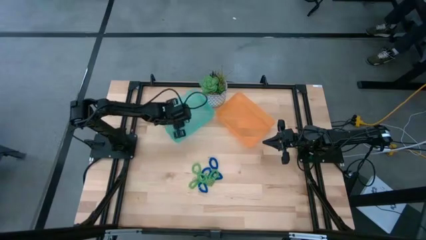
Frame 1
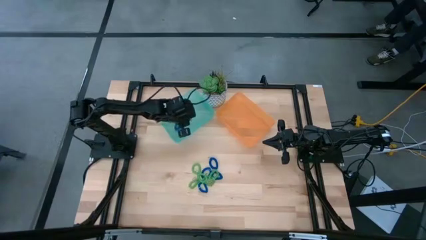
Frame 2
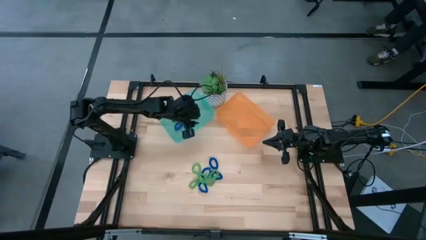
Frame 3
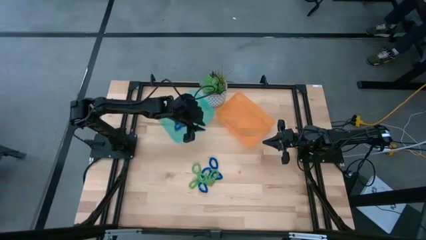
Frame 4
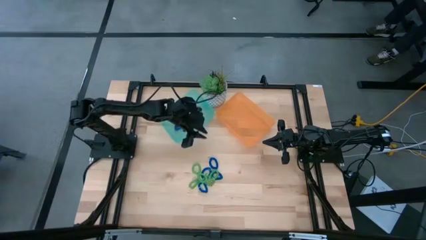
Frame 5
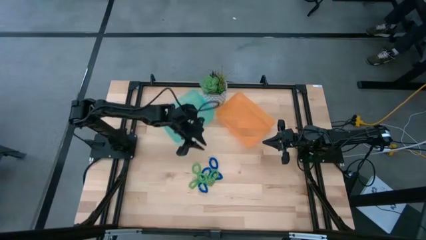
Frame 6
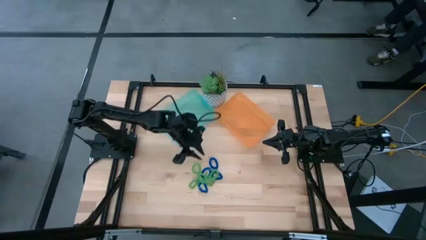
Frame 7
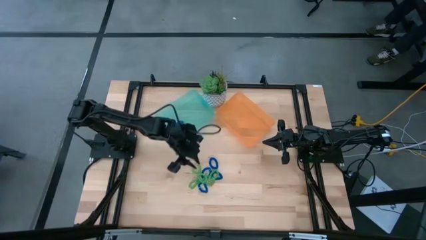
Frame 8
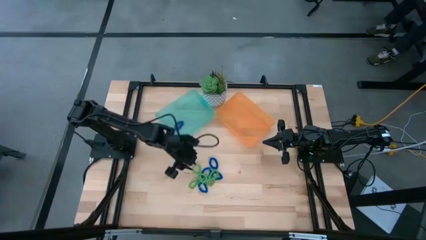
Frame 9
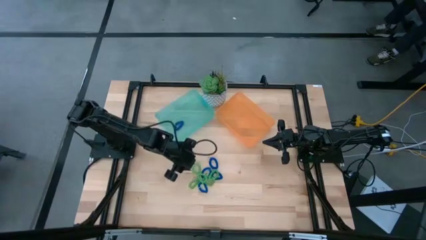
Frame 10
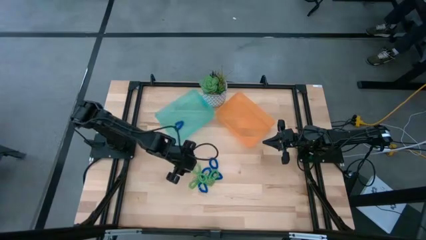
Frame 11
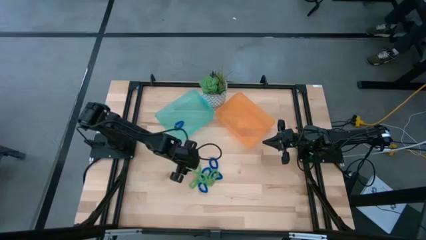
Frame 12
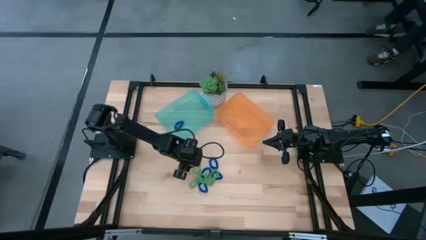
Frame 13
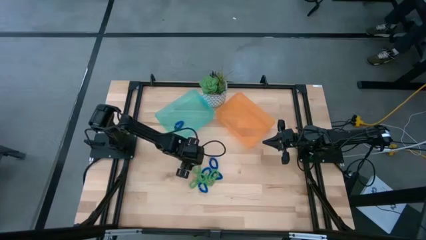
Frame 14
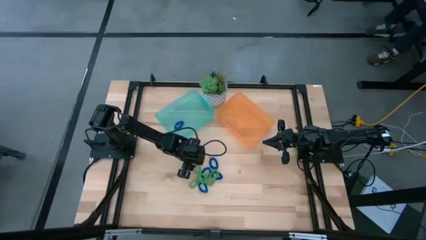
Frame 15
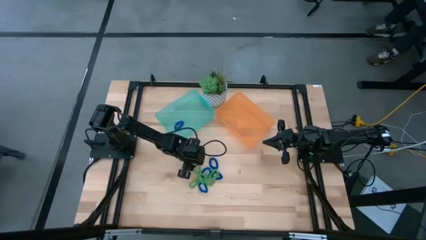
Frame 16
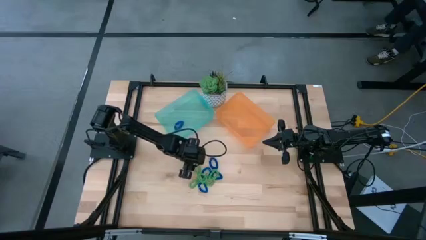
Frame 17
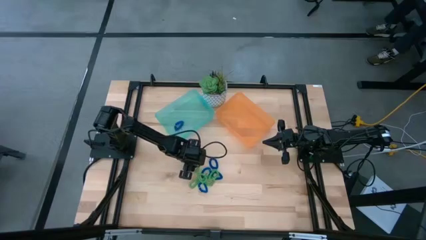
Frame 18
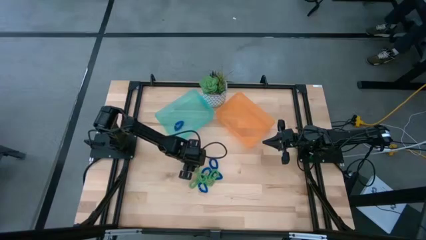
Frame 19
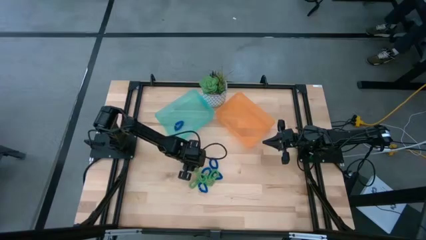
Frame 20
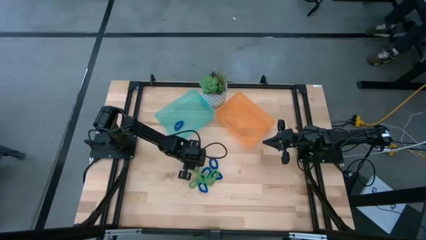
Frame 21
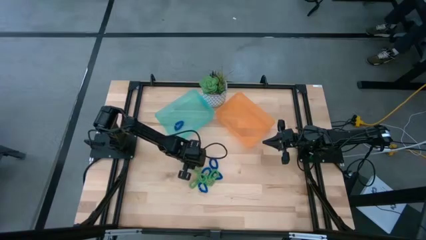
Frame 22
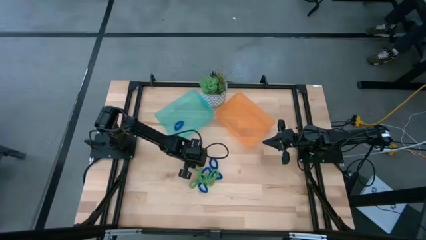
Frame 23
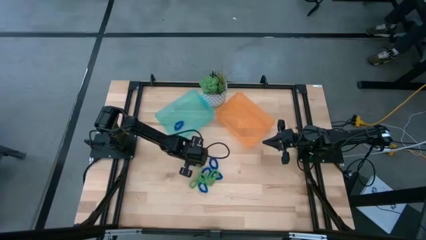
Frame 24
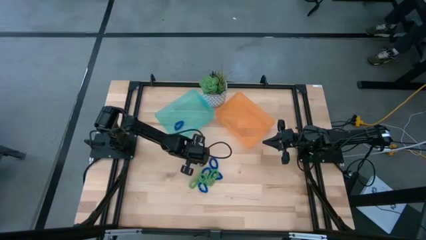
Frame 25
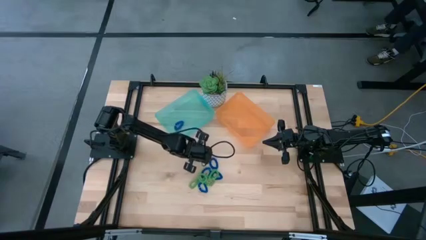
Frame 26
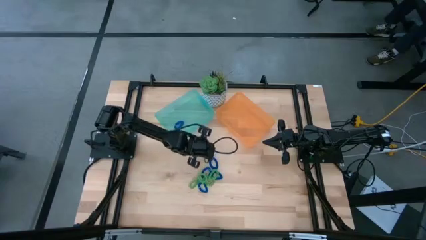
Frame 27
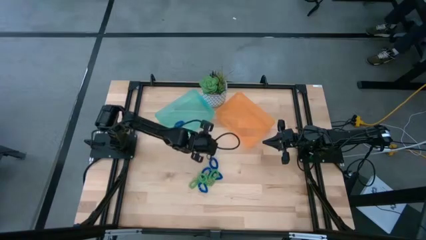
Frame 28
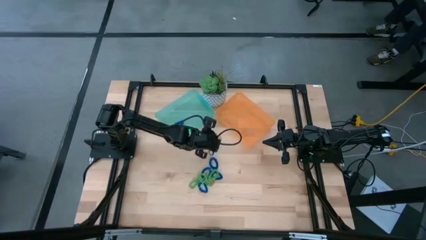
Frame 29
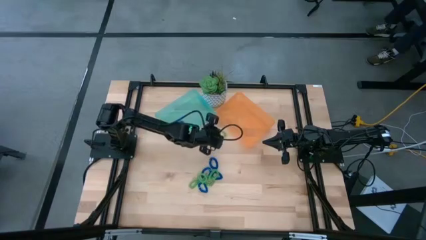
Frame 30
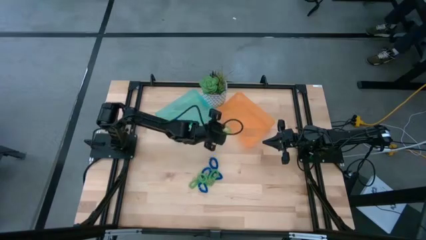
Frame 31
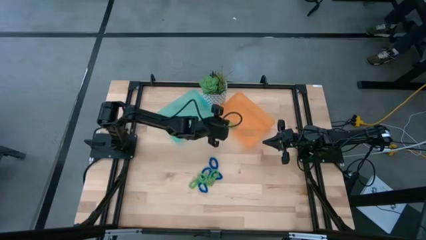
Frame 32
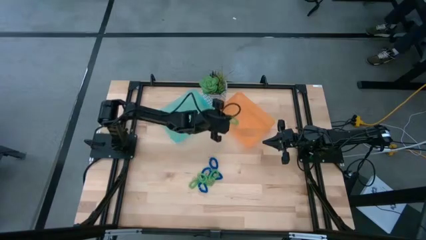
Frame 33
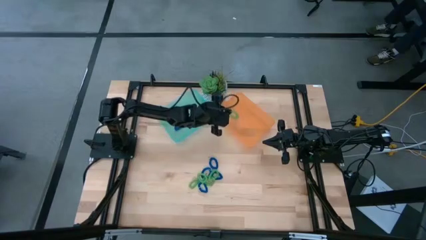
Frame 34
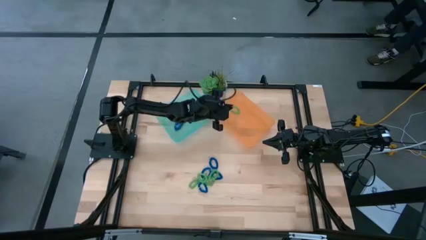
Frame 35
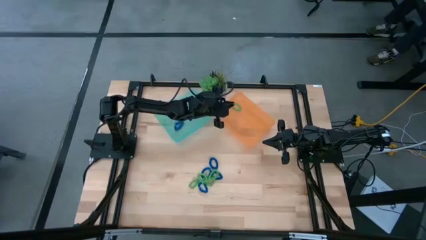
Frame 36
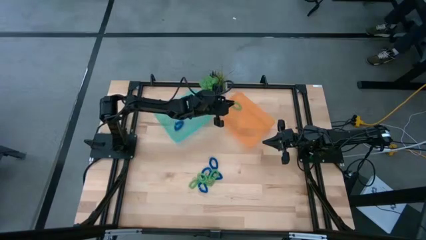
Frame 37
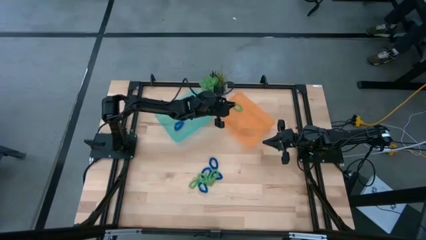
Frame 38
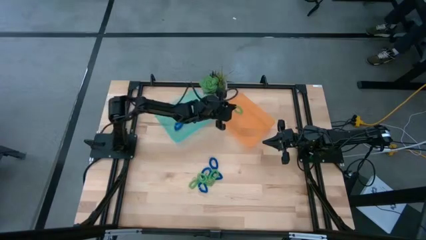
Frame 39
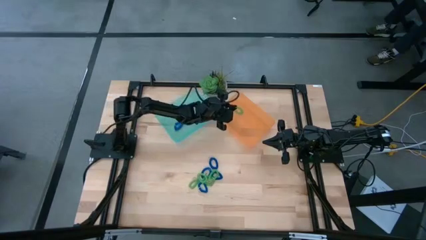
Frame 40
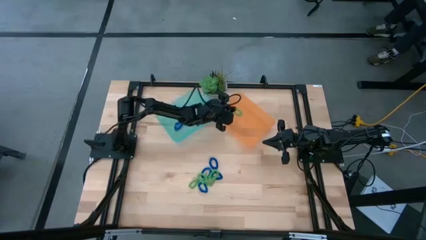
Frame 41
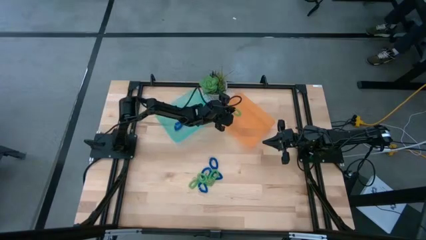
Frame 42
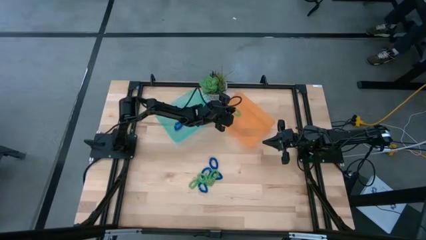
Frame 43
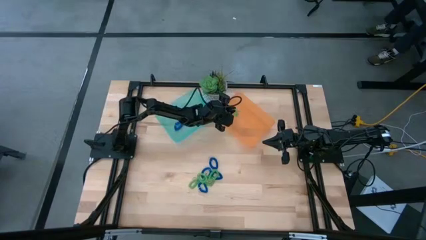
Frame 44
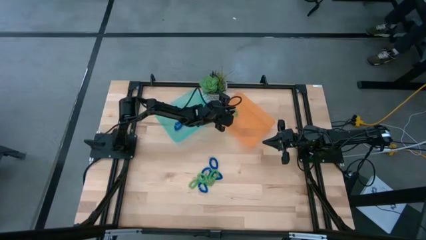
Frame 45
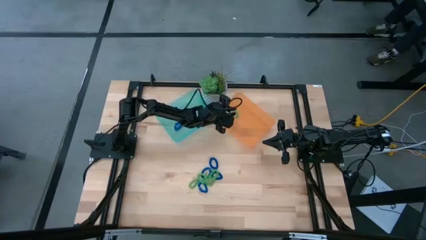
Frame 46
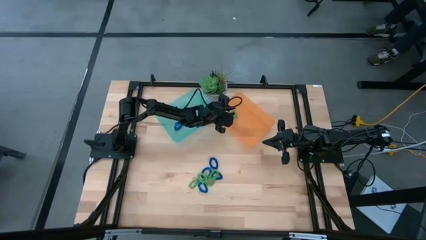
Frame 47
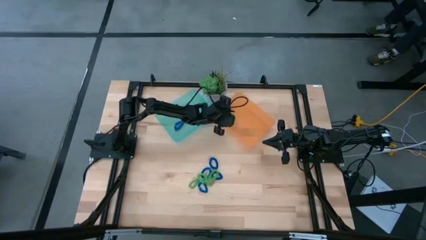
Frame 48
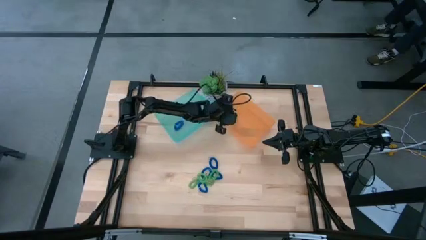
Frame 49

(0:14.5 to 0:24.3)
Task: Sort spring keychains
Put the green spring keychain into the orange bin

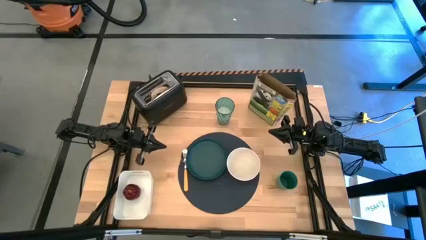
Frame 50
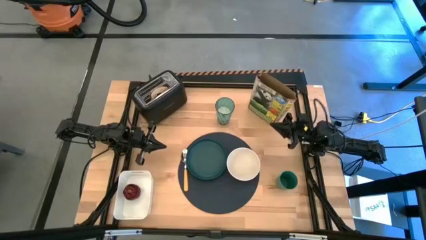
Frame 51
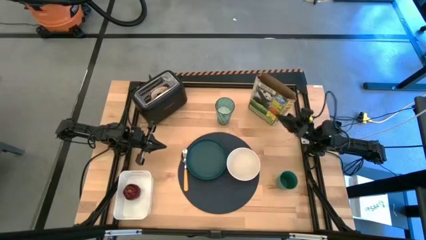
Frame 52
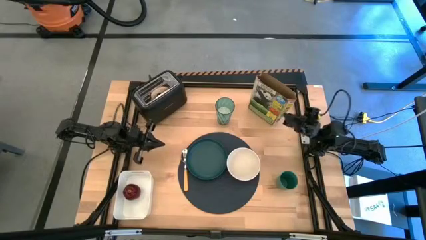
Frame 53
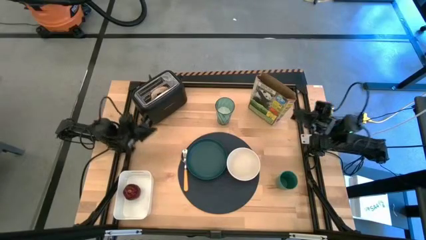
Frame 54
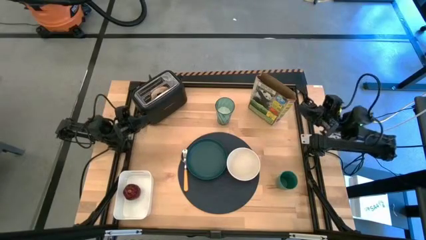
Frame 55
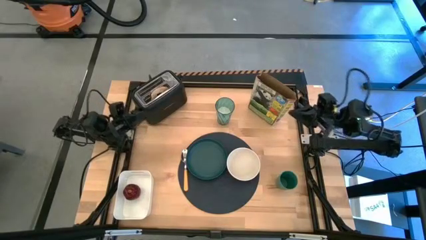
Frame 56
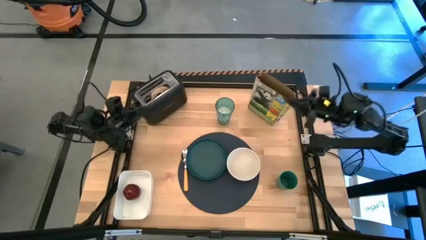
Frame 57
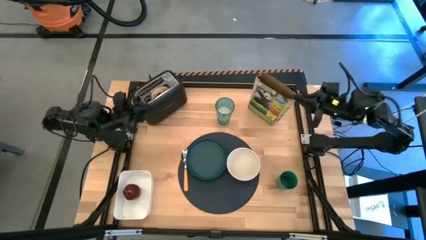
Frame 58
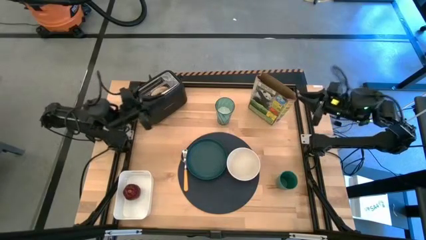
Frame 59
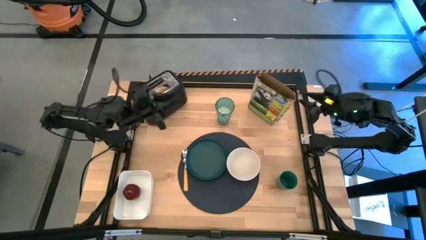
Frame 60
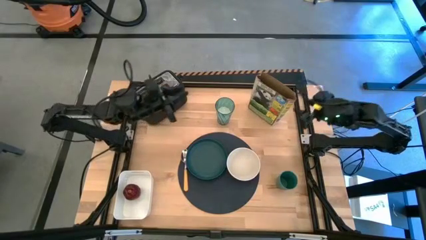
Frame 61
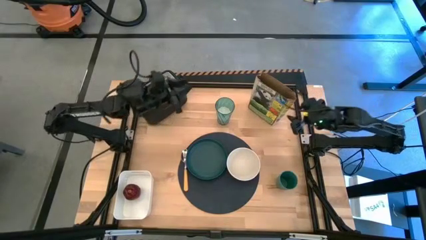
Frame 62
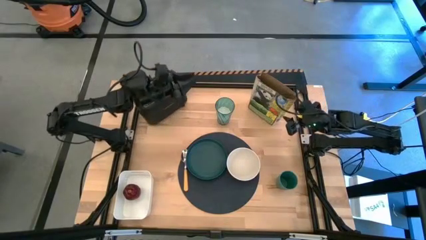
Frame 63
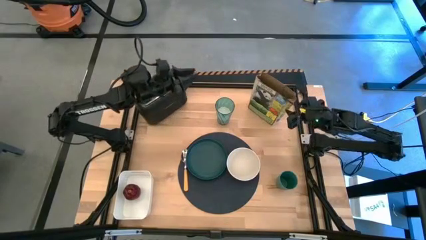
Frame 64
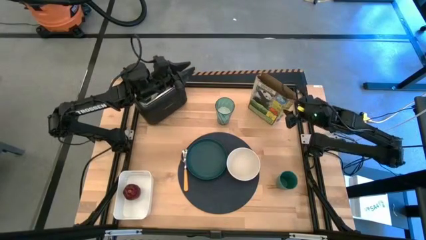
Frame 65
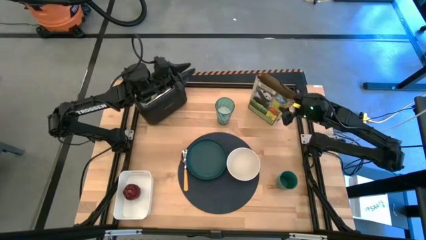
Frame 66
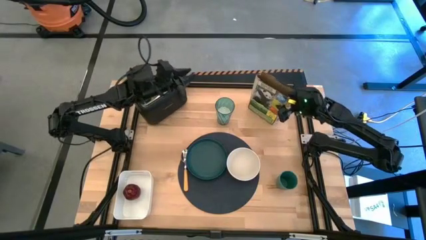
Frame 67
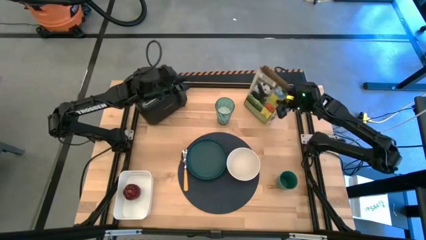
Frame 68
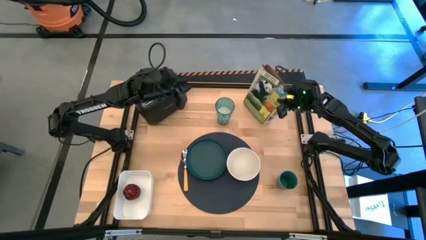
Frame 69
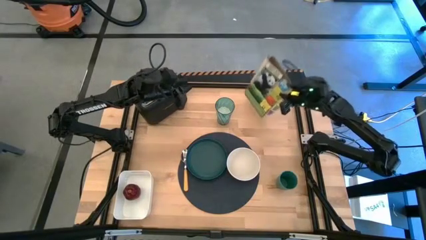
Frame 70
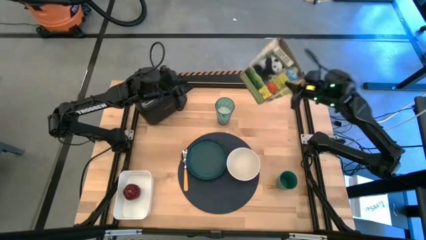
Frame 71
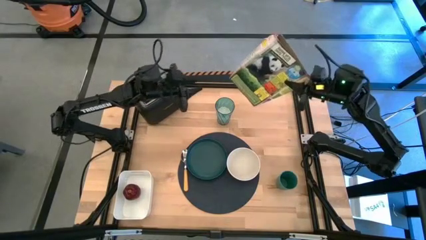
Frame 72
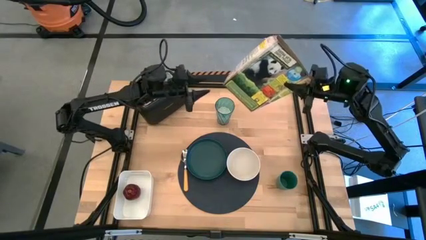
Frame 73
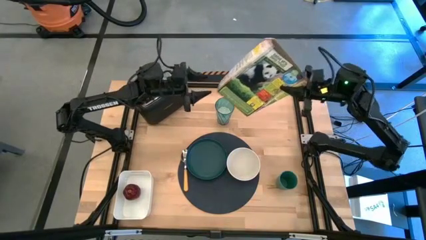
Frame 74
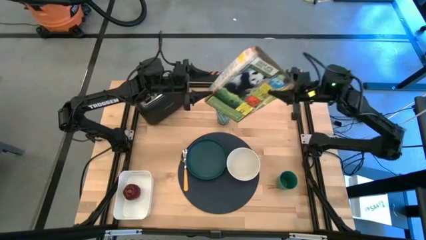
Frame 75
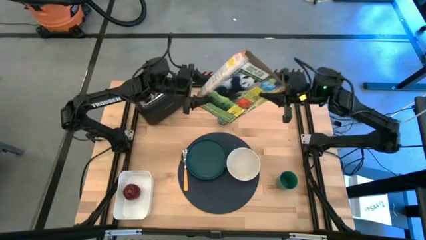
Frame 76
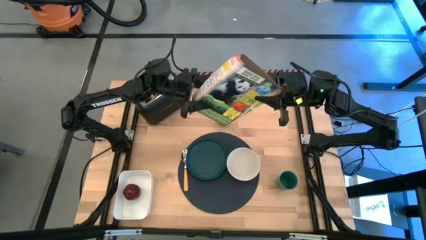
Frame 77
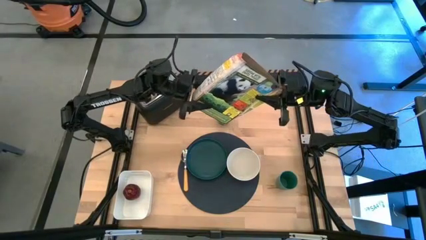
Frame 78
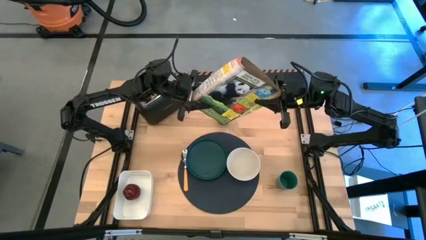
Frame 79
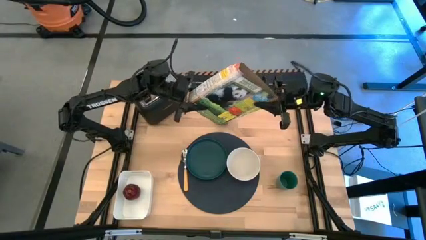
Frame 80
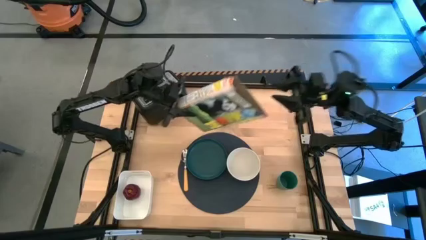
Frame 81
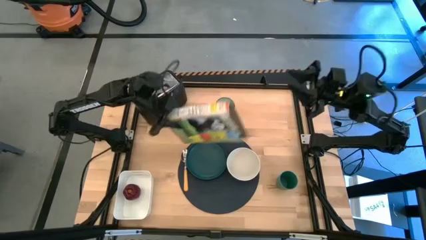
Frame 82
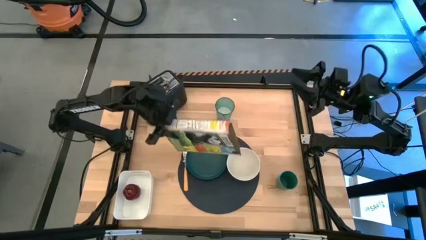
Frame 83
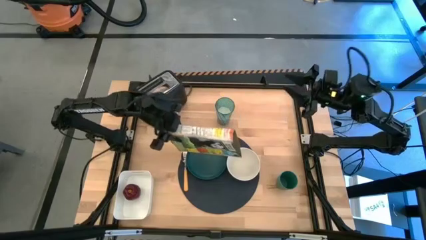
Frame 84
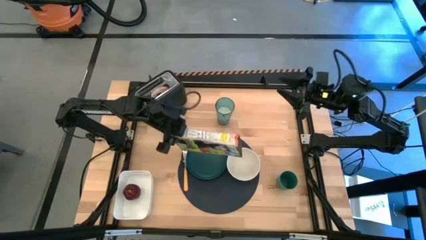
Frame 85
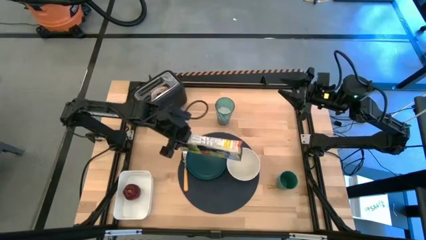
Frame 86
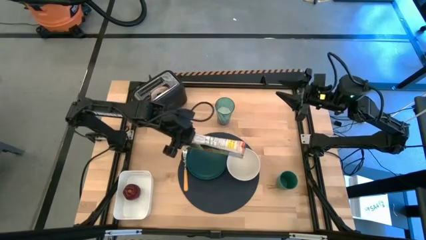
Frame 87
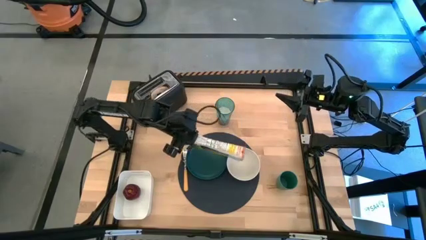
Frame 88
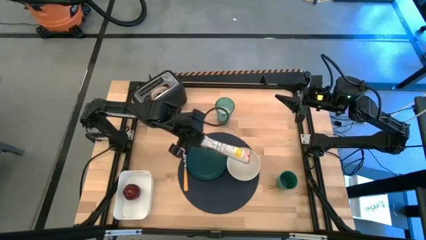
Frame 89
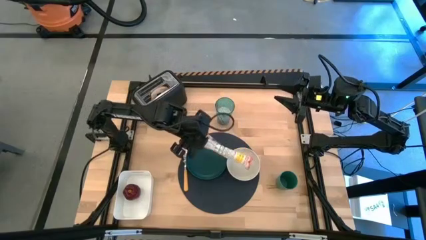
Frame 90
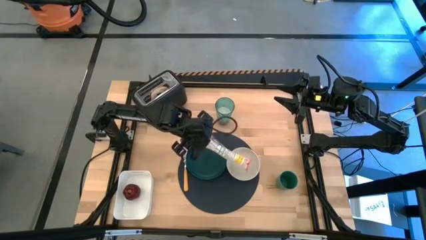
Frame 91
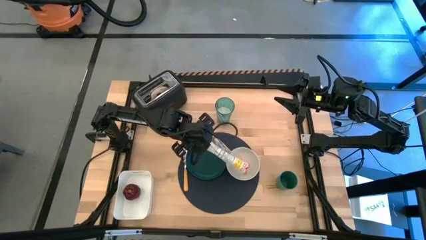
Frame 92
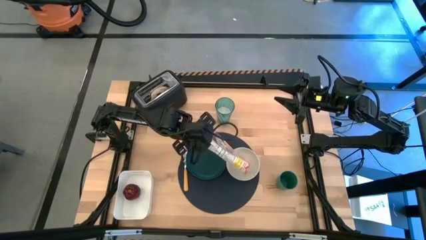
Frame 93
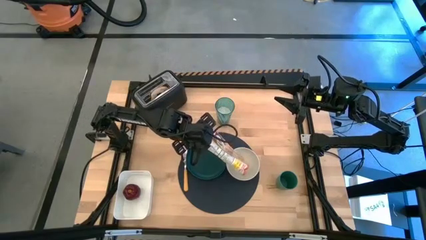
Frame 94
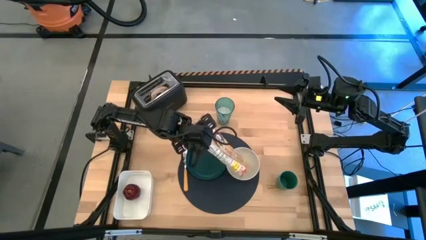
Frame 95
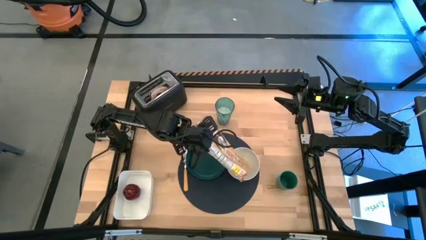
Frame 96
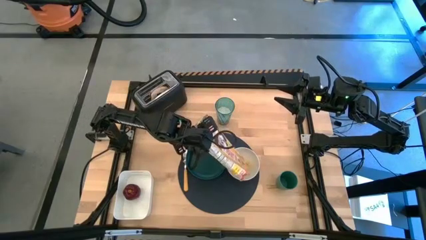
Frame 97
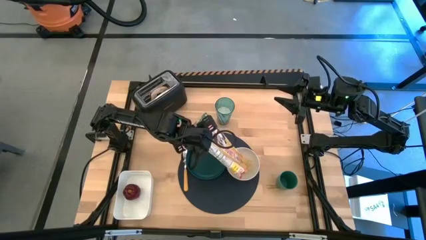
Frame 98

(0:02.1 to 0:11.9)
Task: Arrange a breakfast setting
Pour the cereal into the white bowl
